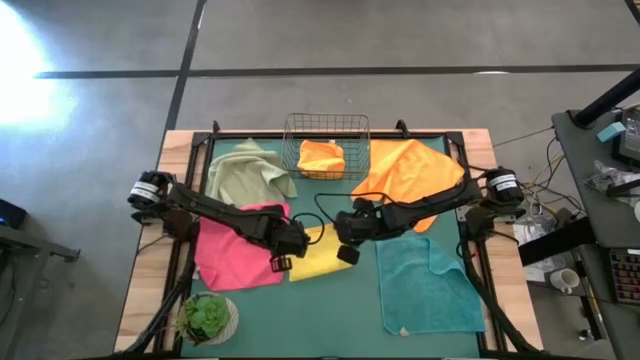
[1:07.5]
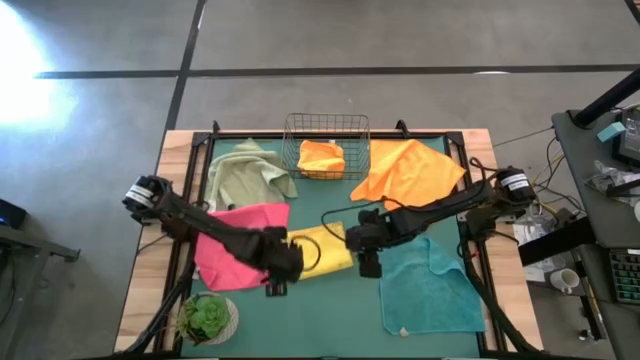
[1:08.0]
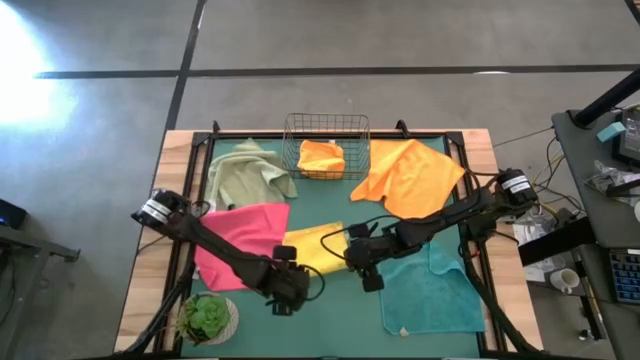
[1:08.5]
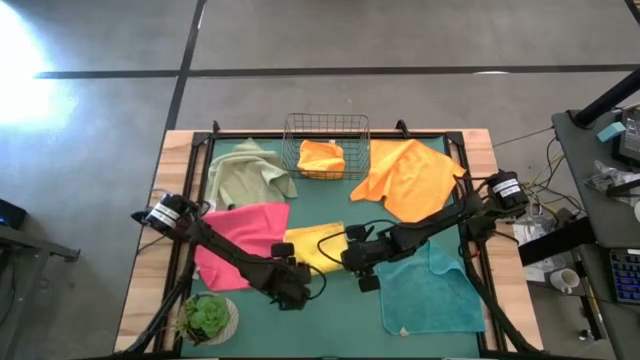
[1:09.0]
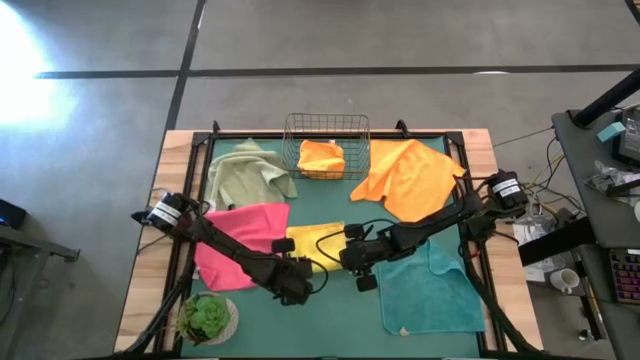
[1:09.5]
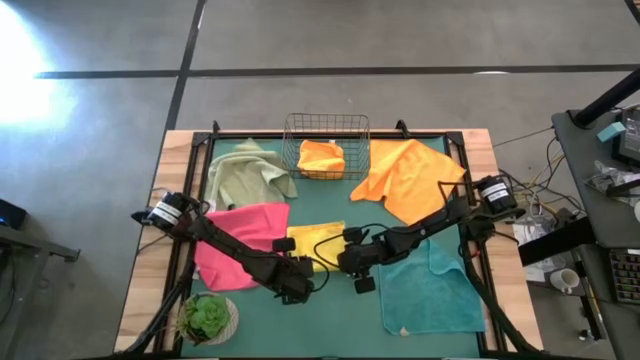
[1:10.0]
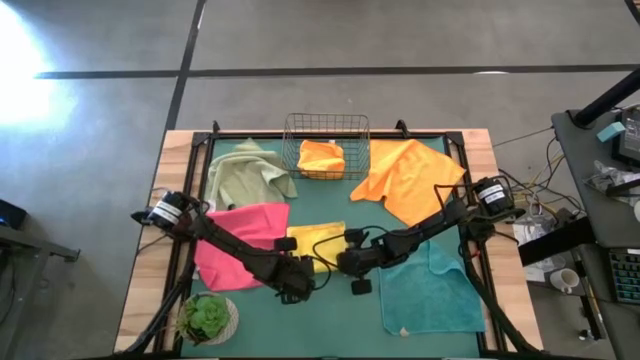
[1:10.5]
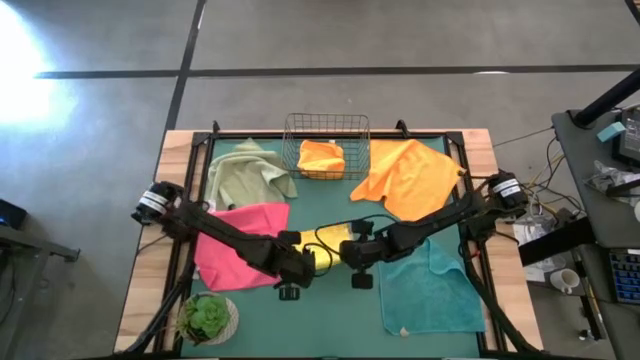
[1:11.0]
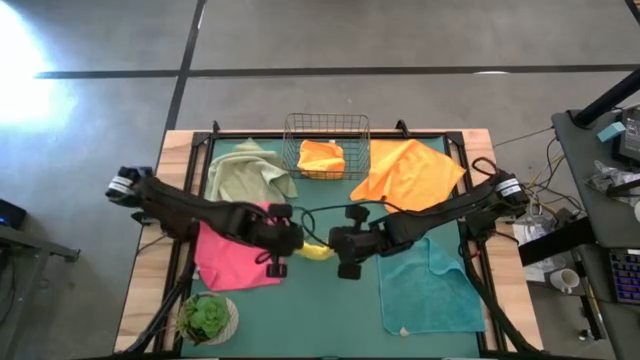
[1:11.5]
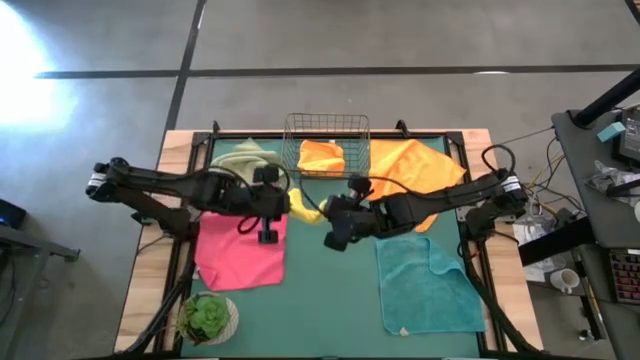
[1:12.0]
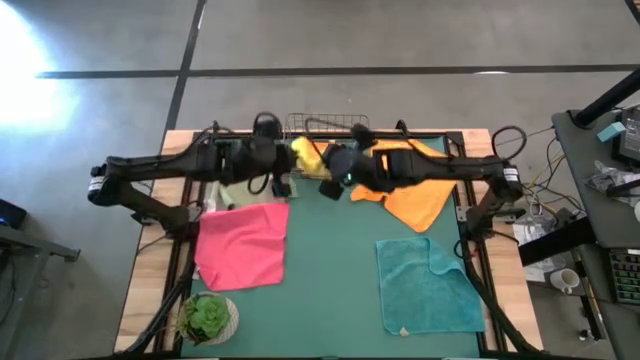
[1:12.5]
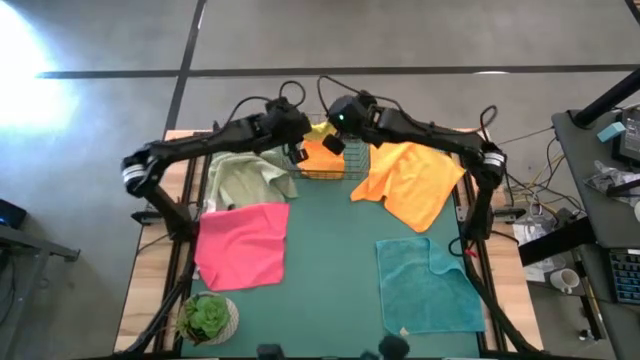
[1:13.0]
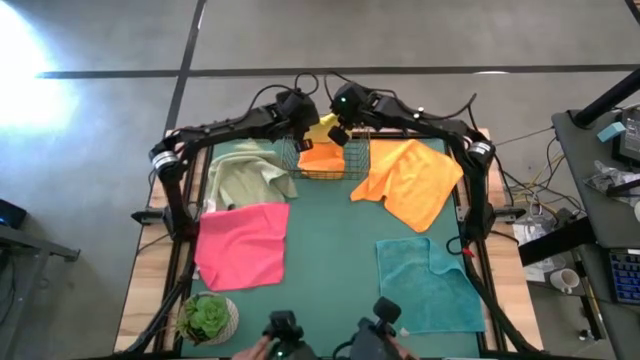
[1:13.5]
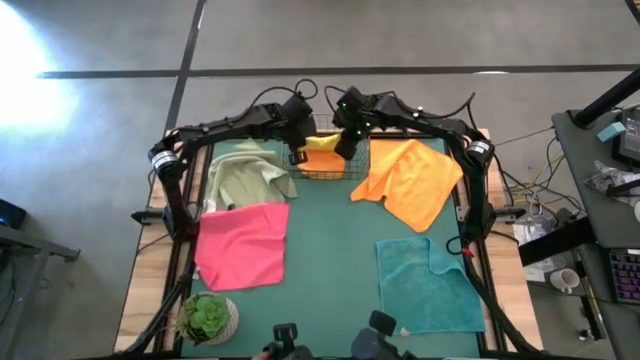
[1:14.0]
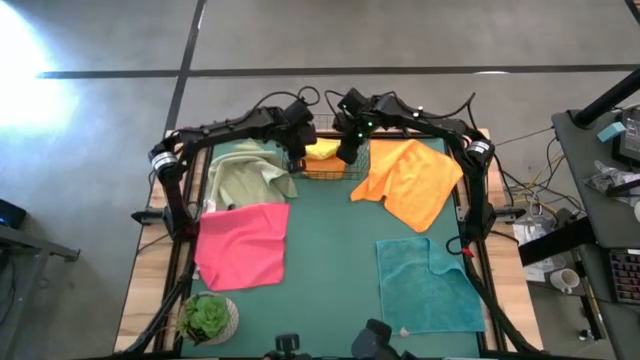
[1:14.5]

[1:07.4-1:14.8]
Task: Fold microfiber towels
Put the yellow microfiber towel into the wire basket

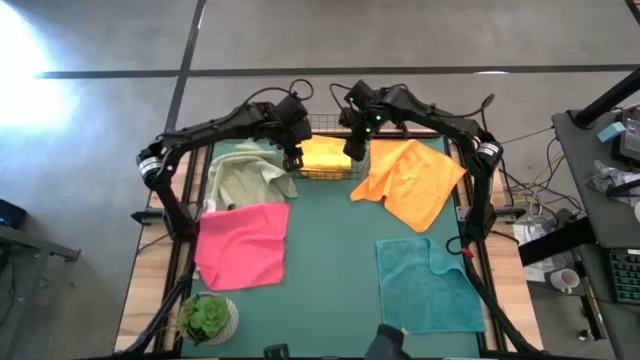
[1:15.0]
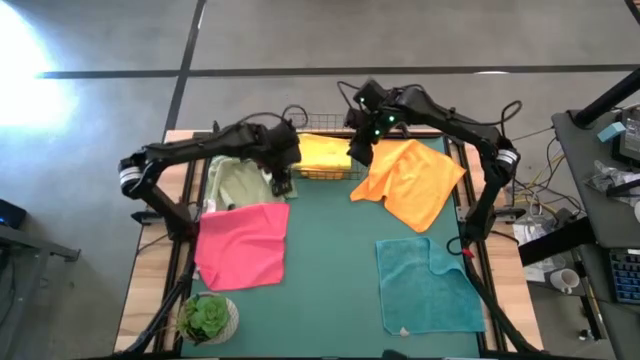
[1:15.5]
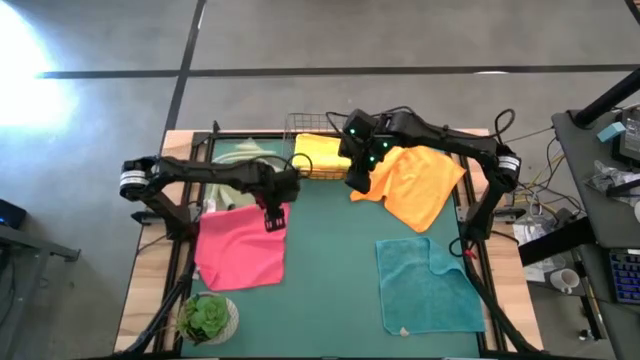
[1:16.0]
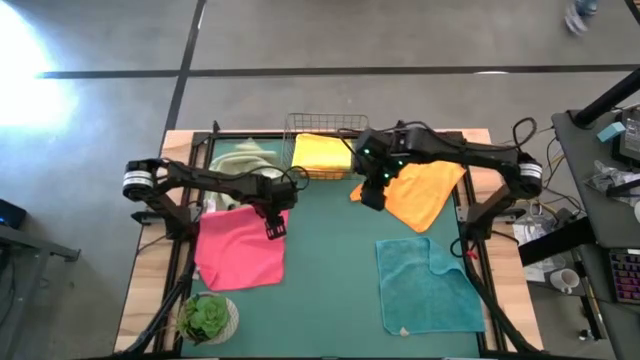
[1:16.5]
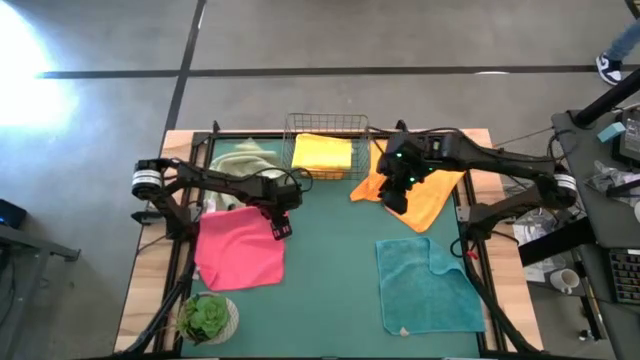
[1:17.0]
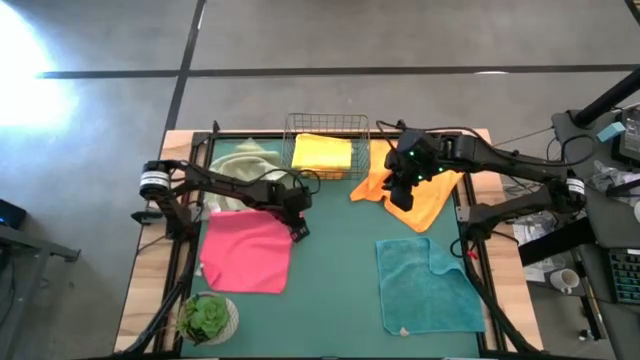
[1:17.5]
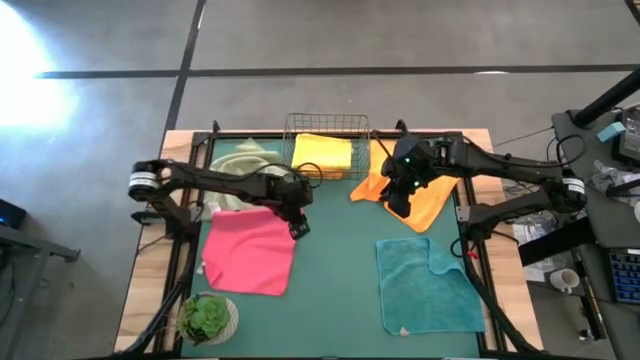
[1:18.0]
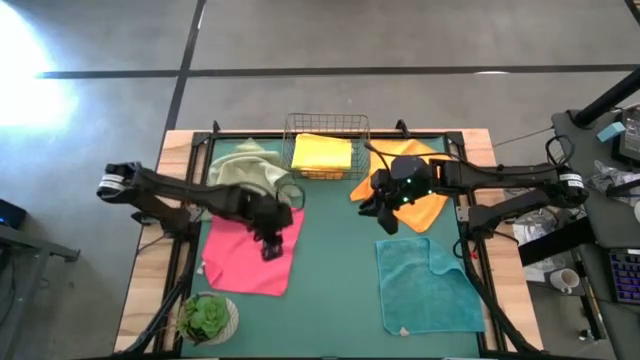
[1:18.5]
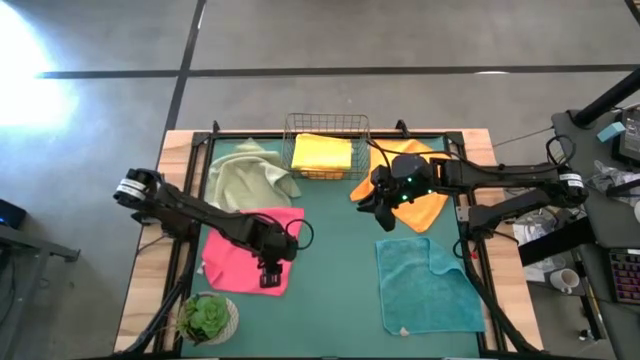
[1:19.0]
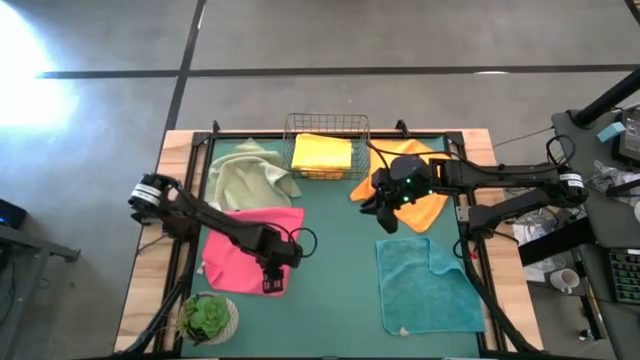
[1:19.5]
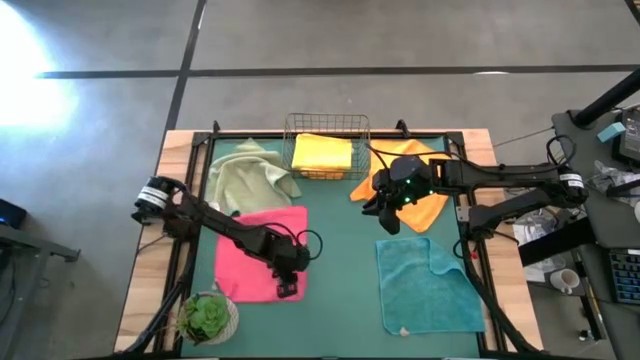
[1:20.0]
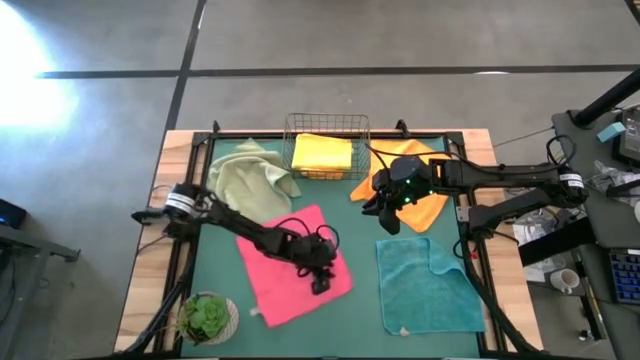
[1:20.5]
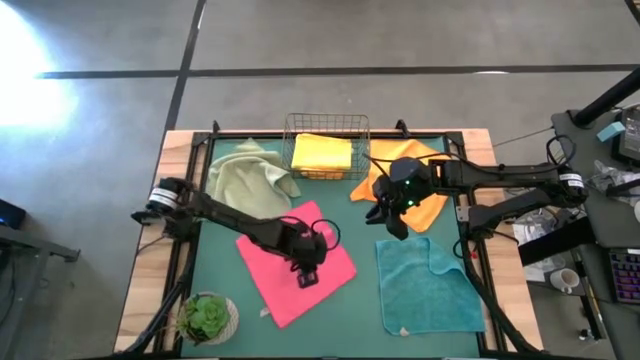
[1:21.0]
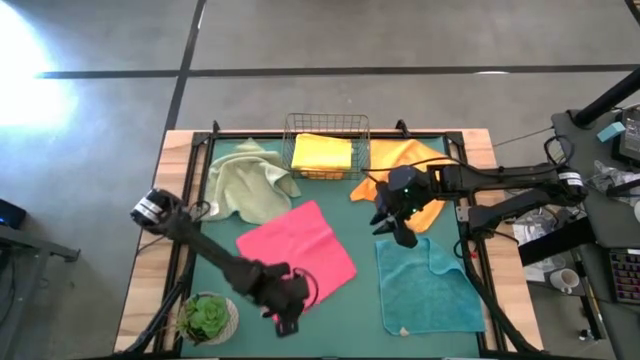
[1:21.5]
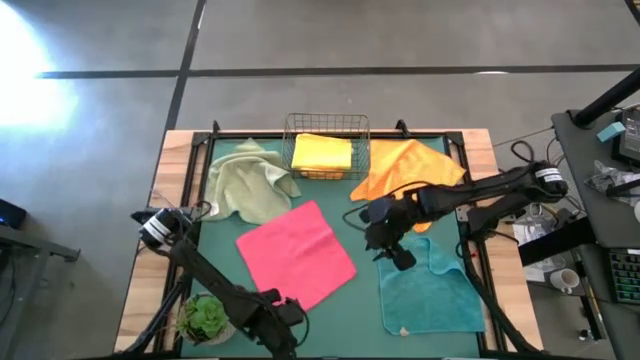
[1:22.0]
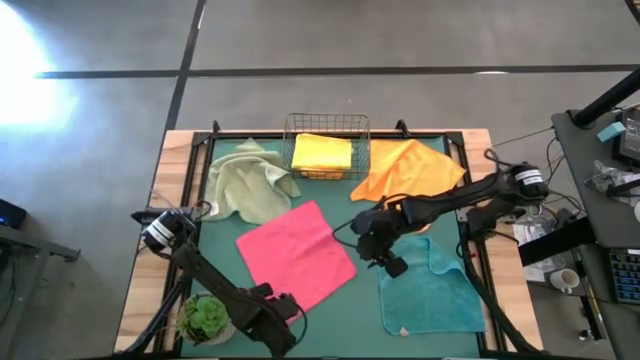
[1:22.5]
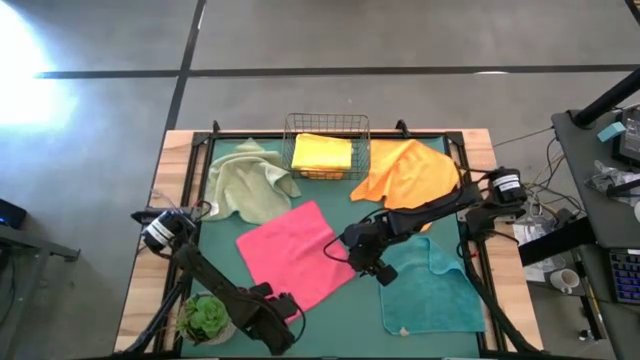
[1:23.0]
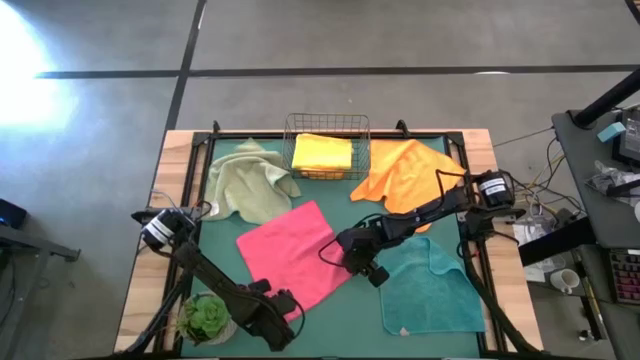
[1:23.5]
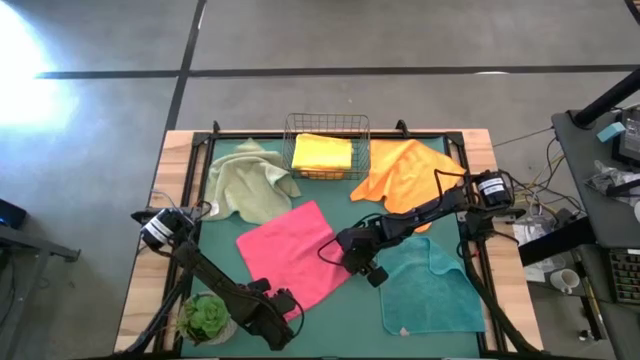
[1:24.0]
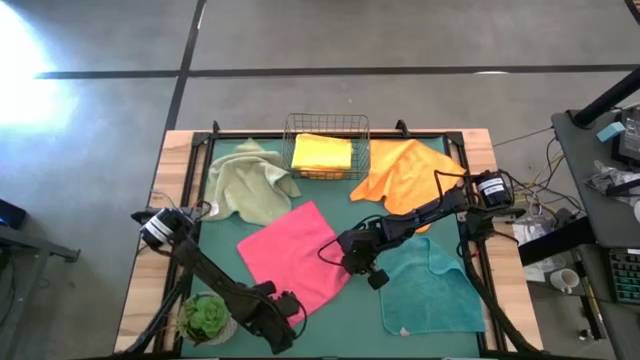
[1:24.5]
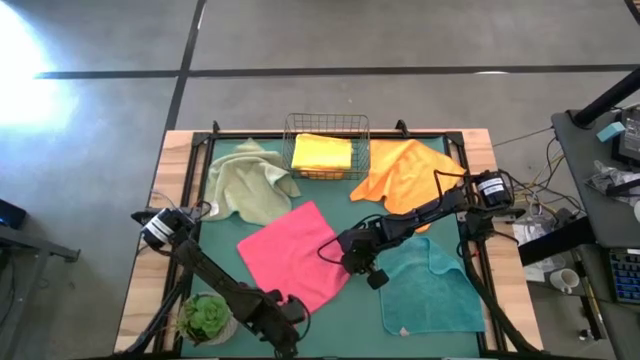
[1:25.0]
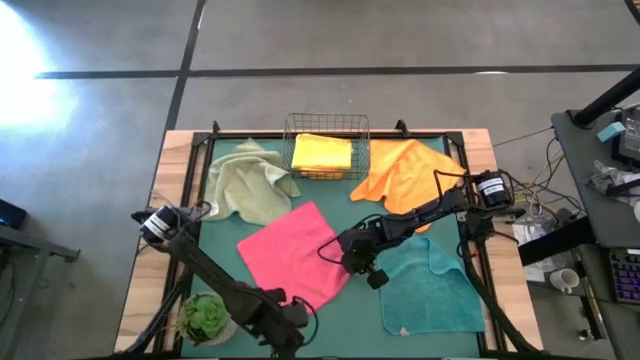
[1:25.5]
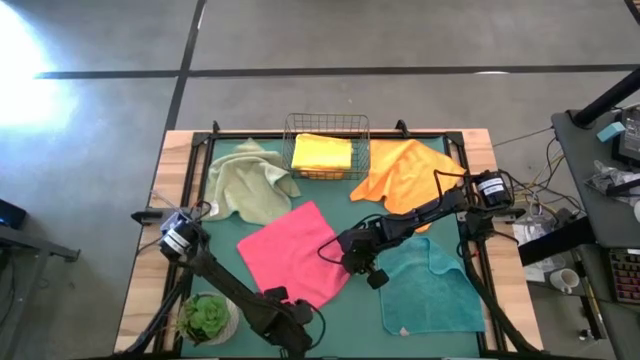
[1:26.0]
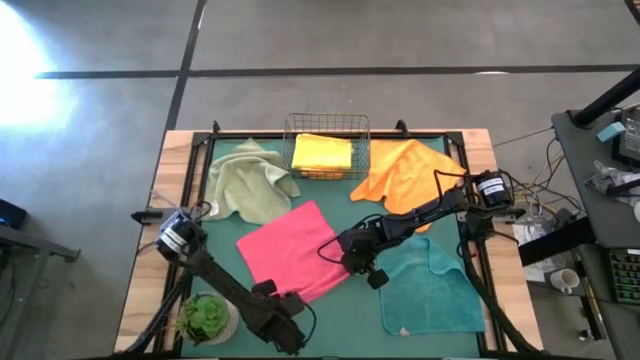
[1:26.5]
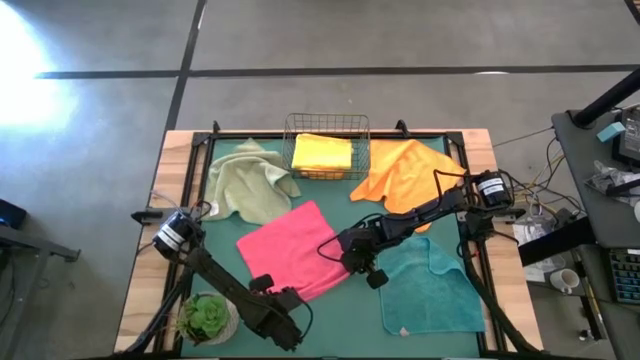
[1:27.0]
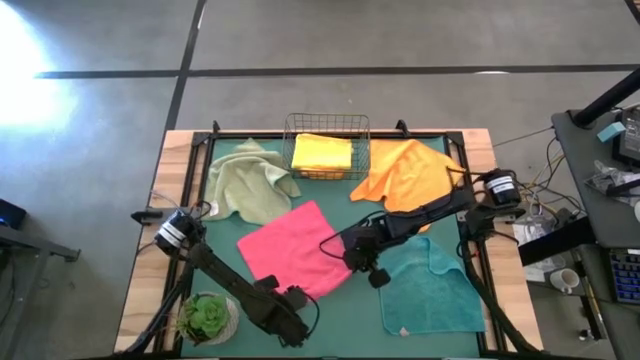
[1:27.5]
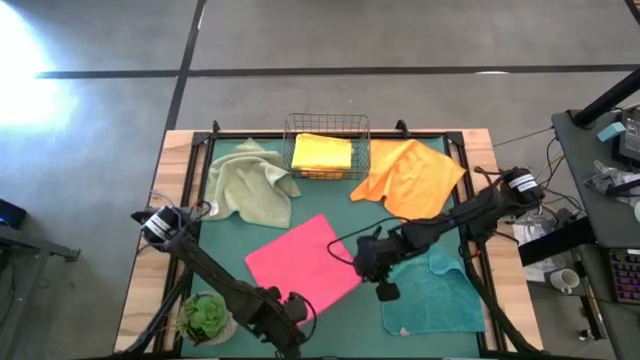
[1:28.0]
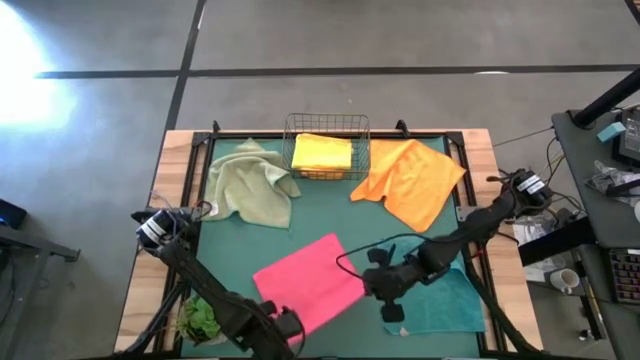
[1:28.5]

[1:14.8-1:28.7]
Fold the pink microfiber towel
